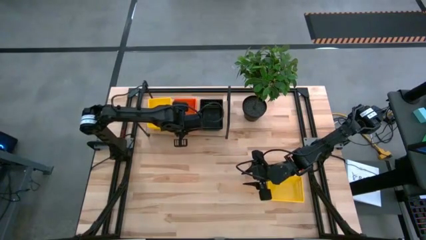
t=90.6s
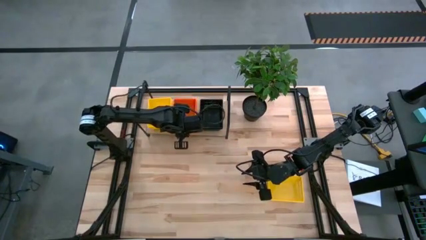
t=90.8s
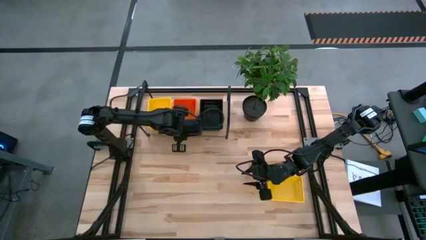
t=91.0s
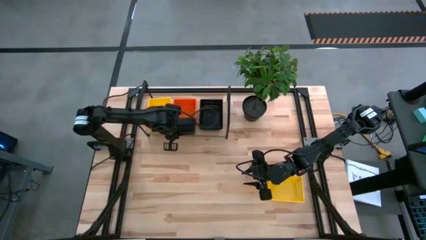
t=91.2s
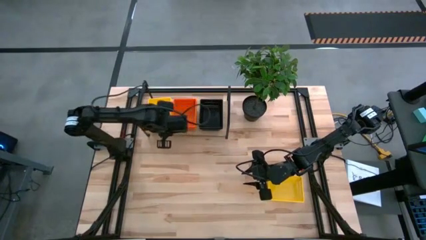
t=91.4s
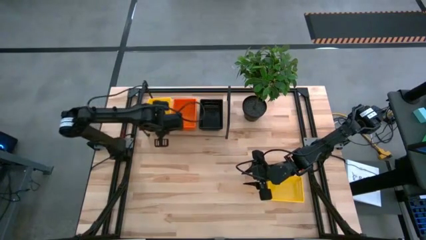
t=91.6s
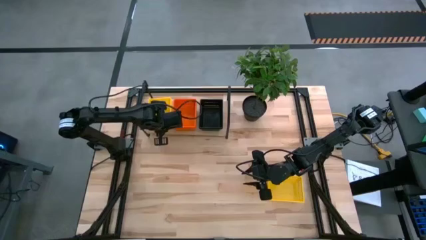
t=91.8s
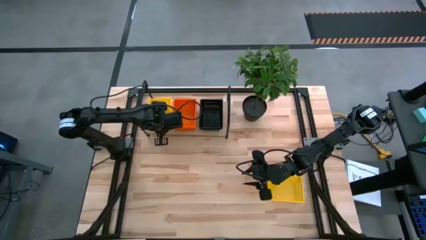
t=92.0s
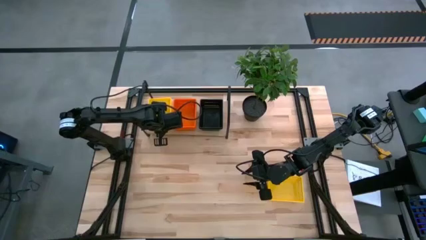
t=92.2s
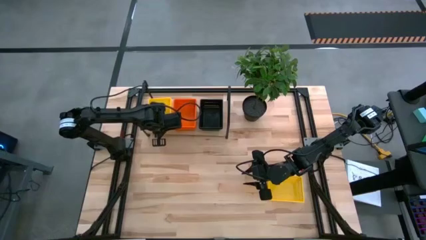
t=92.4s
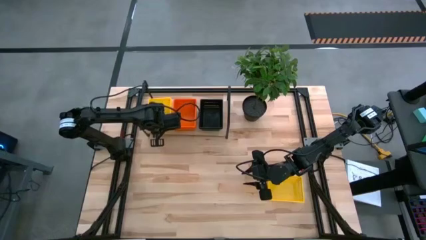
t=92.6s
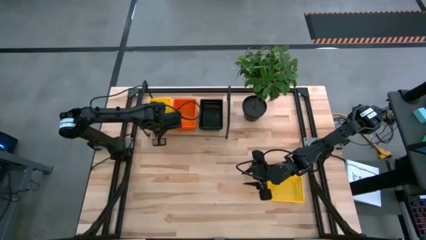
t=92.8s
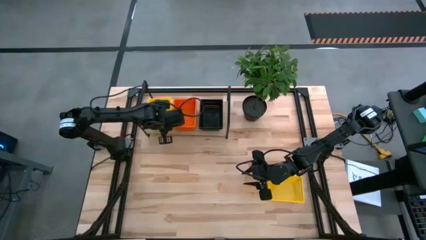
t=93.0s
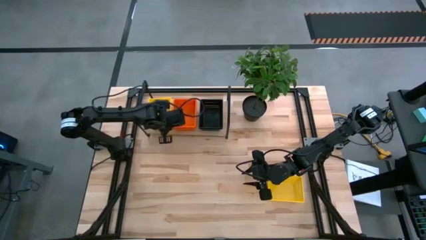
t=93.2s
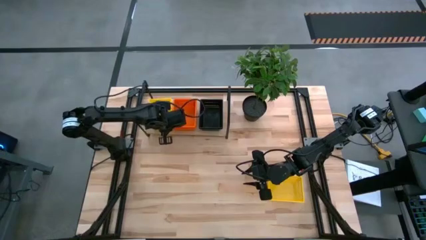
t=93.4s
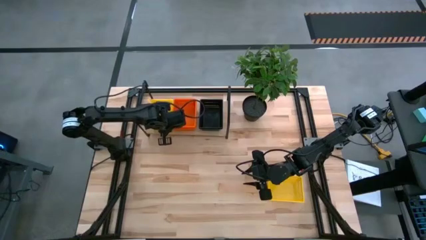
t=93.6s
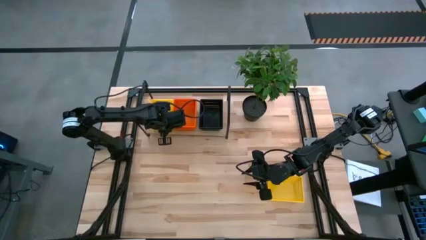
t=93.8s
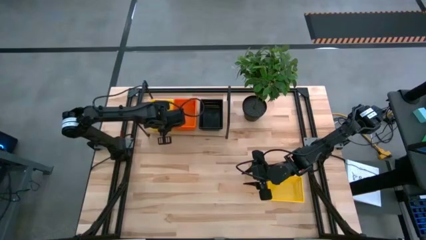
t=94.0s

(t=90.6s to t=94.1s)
Task: Stack baskets on shelf by color
Adjust the stacked yellow baskets on the shelf

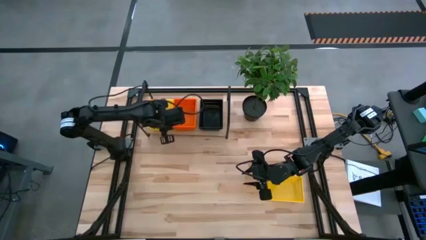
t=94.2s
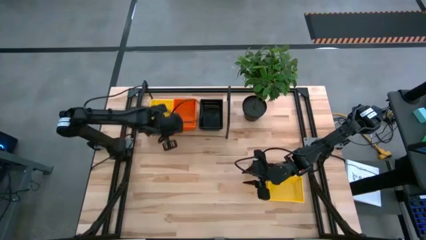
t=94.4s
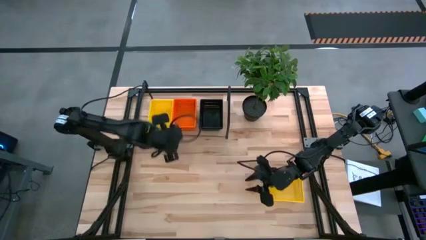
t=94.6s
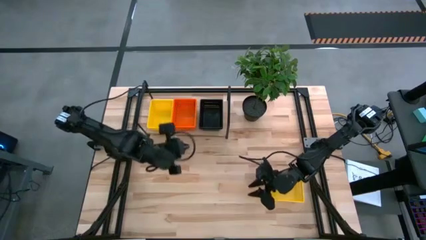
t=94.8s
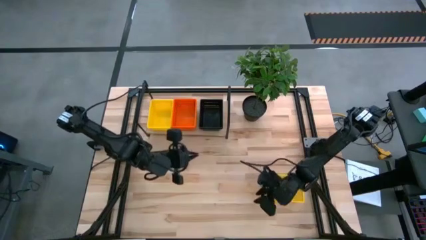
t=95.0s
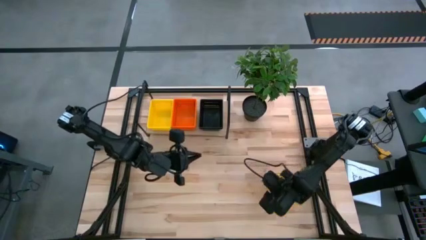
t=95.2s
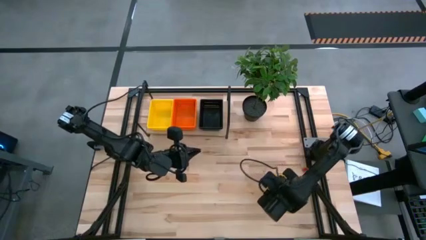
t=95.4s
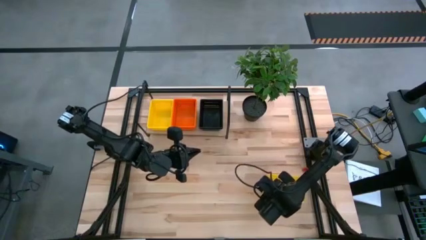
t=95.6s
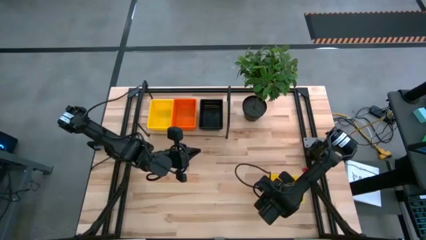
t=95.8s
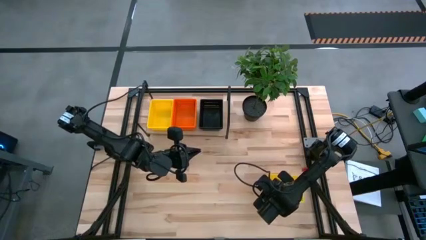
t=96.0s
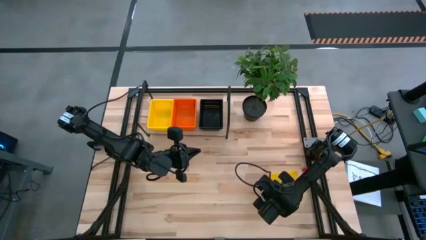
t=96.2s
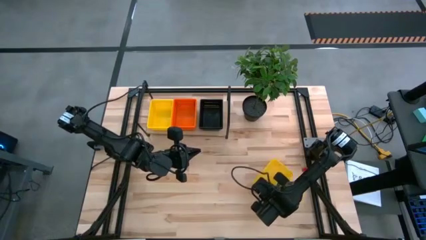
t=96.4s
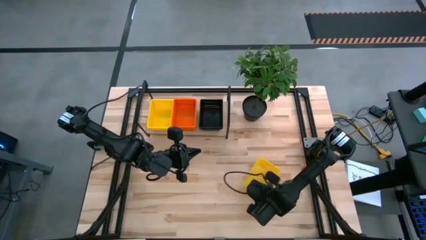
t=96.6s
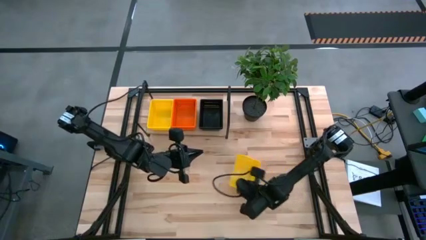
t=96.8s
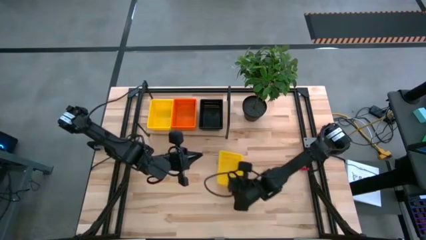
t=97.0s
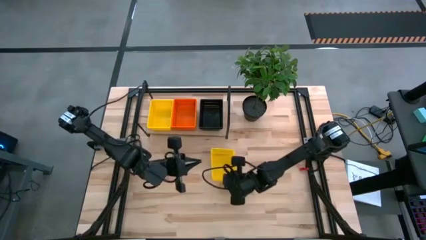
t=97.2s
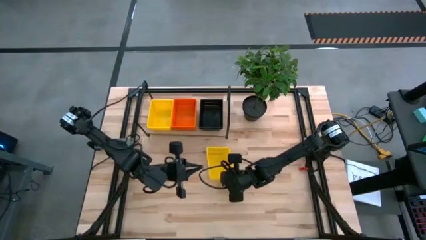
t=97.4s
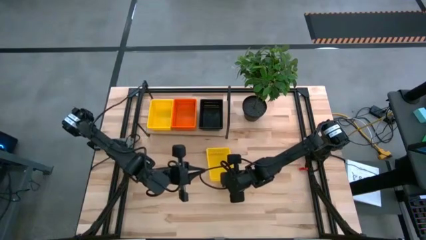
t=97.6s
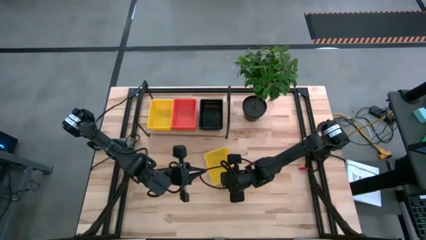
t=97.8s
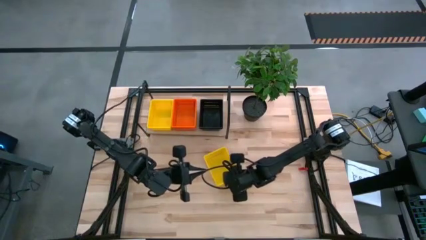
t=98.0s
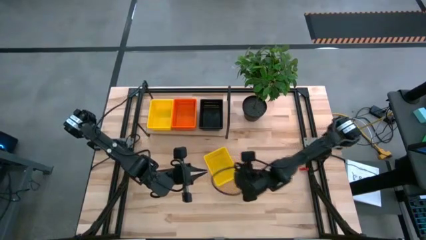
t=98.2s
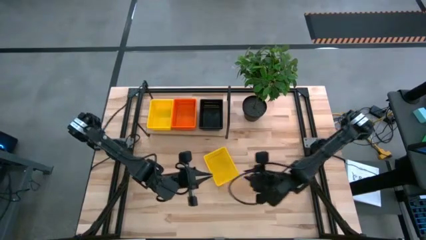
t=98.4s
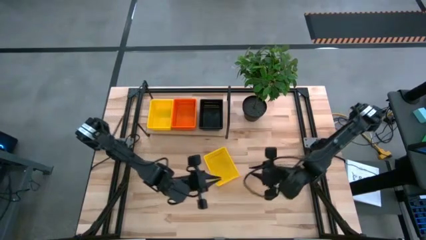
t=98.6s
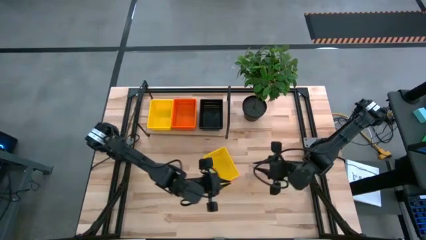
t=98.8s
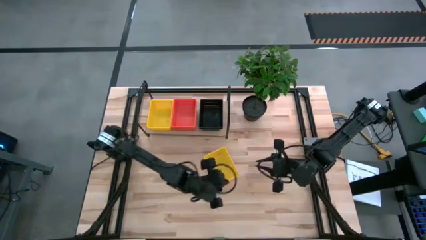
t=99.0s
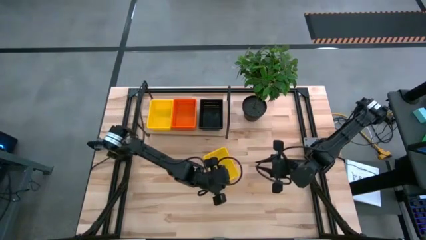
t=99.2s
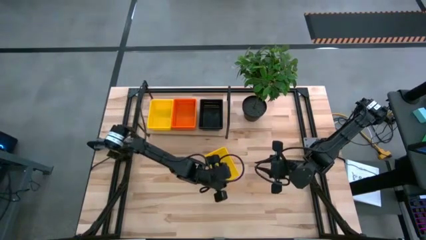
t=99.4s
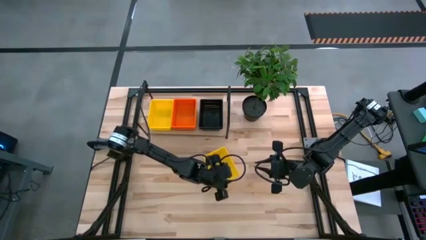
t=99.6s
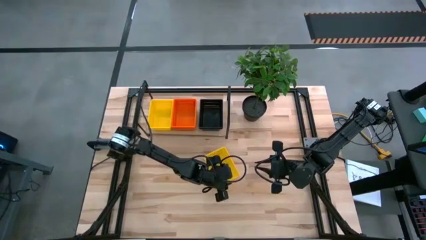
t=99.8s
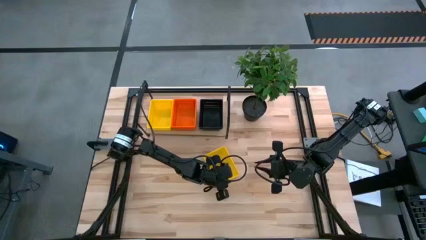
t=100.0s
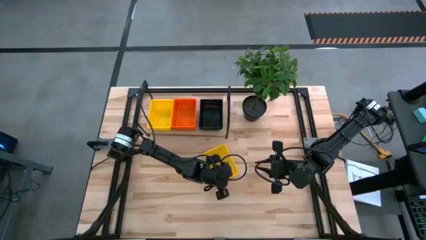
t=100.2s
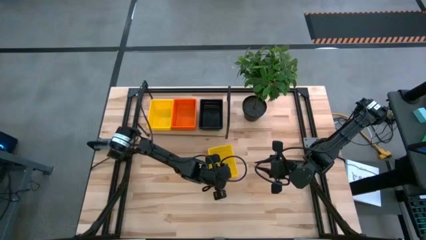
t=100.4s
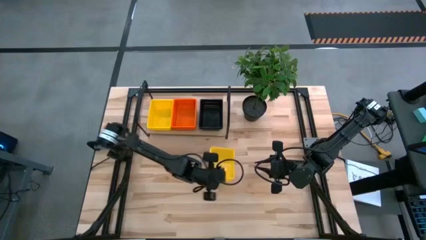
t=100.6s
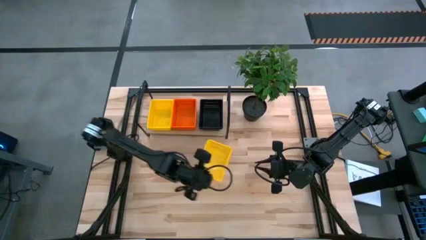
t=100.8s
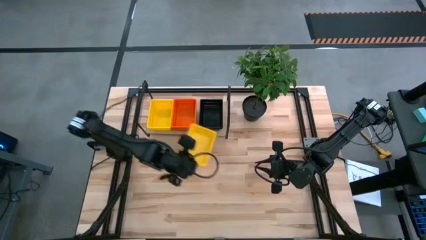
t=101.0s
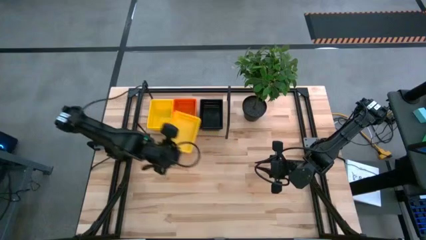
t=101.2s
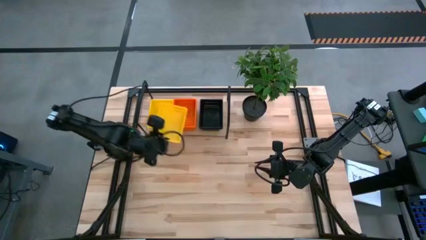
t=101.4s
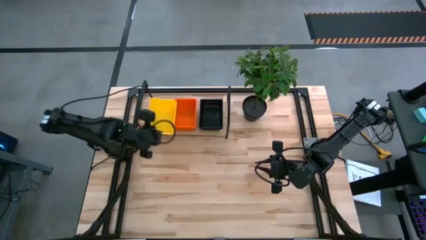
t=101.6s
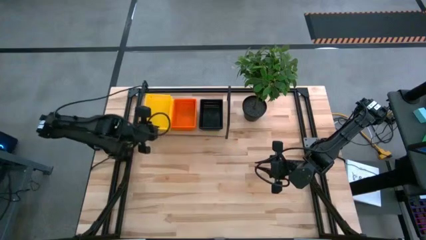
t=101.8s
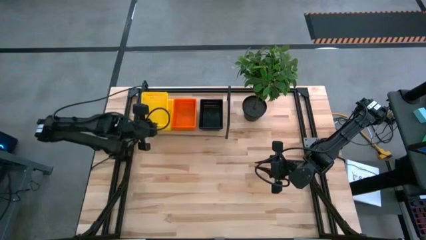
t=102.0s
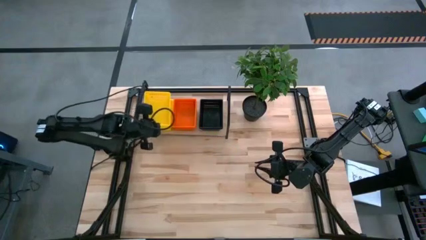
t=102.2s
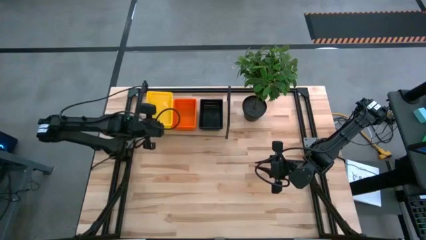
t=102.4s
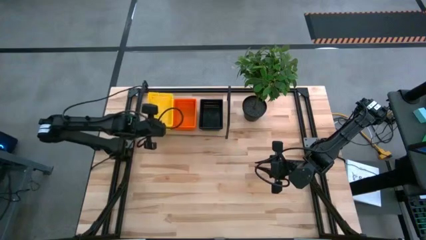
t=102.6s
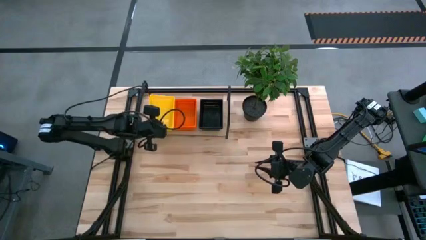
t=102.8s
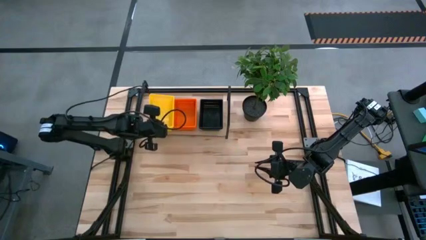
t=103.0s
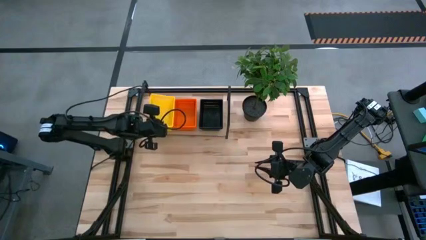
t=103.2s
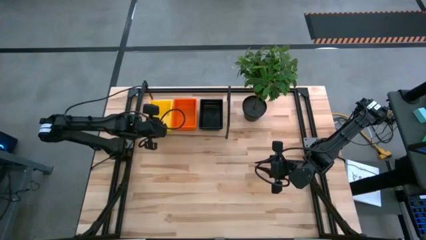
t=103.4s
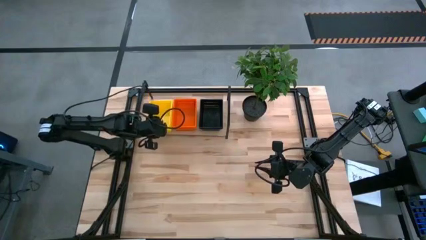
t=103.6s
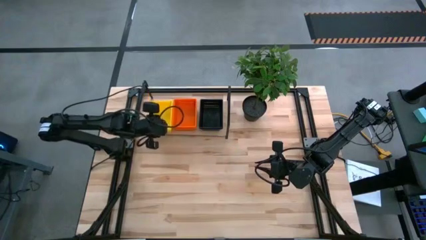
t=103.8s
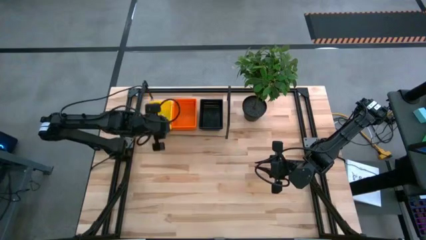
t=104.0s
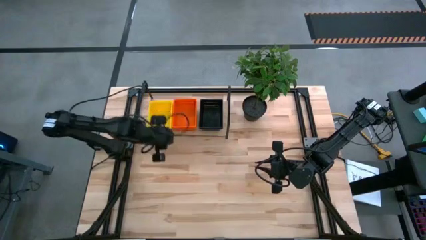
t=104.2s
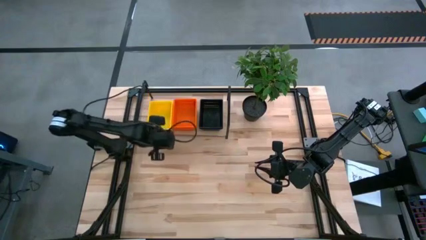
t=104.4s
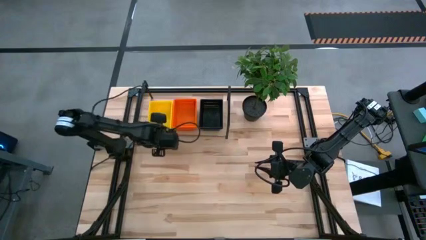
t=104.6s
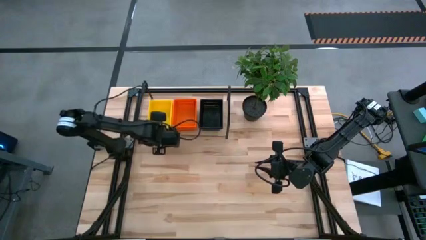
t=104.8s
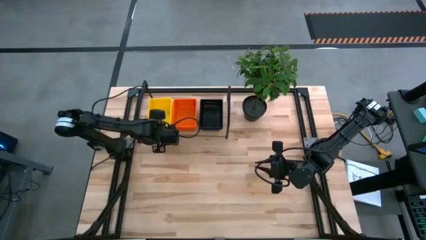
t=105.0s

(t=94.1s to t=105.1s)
Stack the yellow basket on the yellow basket on the shelf
